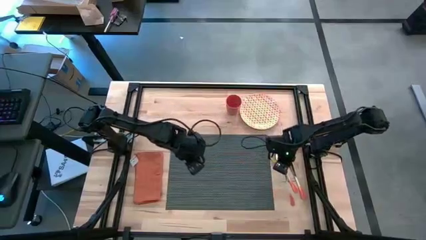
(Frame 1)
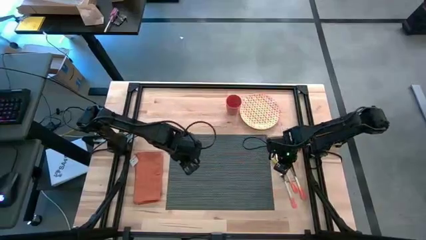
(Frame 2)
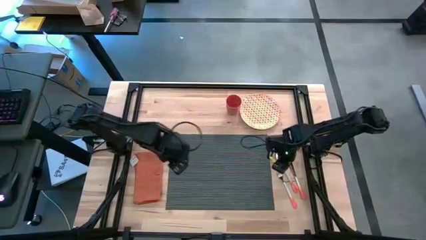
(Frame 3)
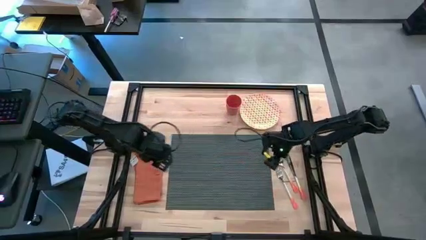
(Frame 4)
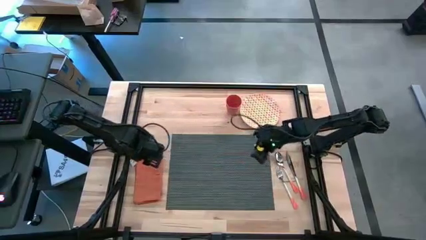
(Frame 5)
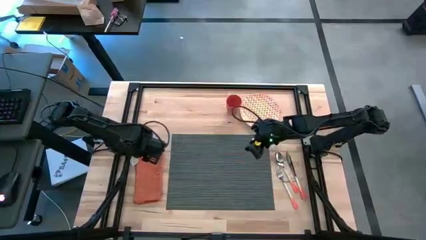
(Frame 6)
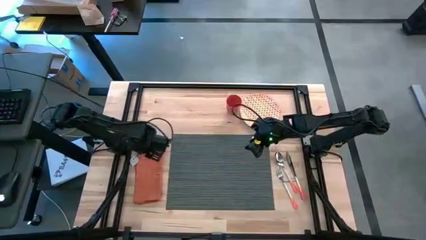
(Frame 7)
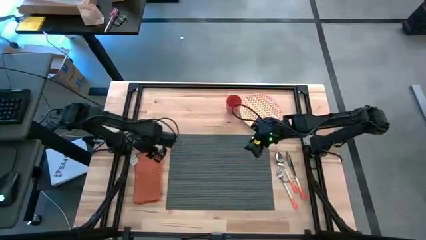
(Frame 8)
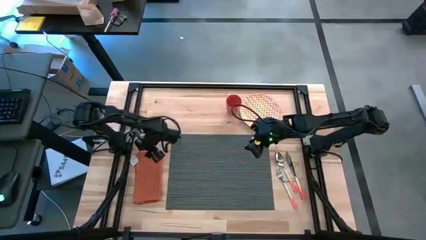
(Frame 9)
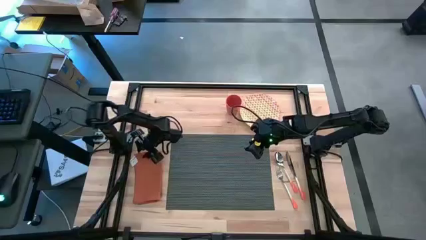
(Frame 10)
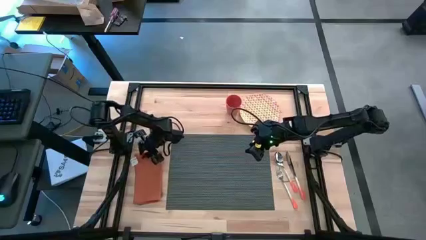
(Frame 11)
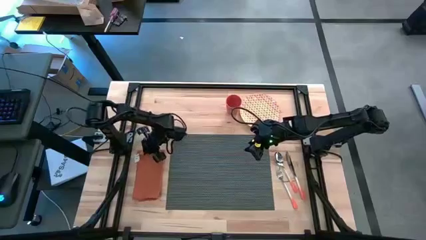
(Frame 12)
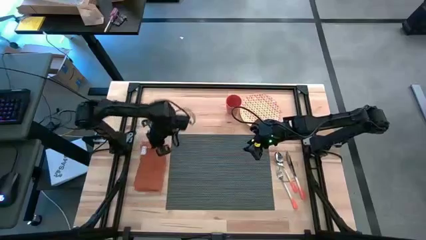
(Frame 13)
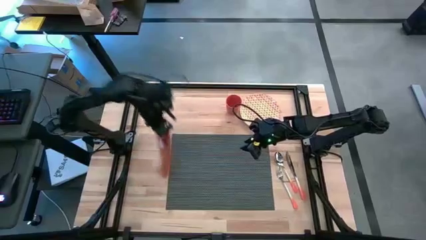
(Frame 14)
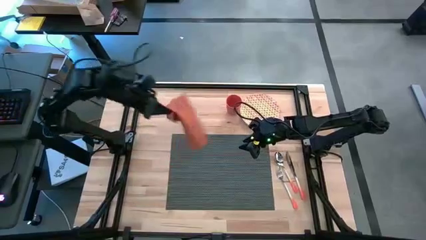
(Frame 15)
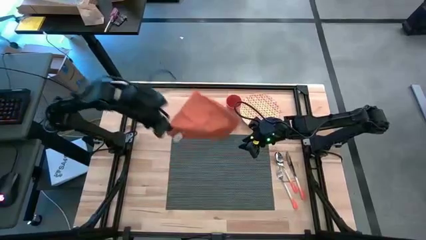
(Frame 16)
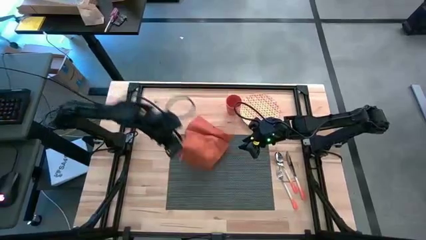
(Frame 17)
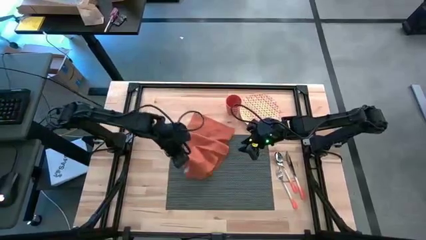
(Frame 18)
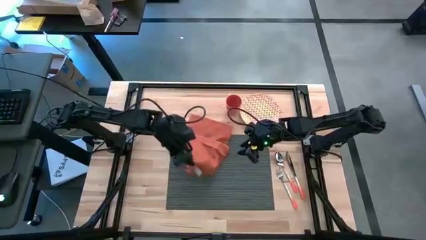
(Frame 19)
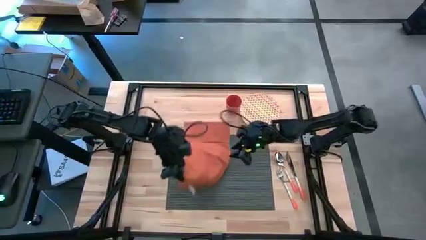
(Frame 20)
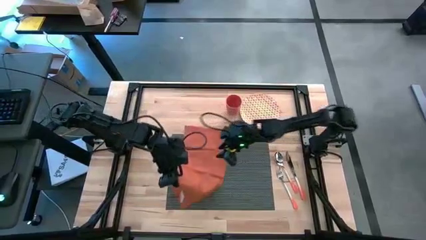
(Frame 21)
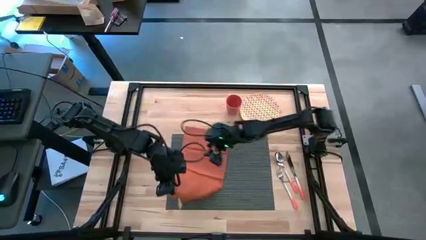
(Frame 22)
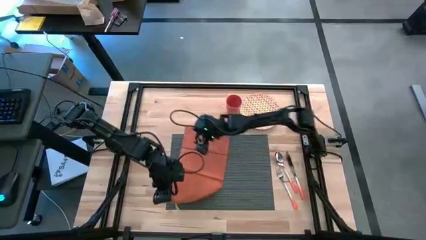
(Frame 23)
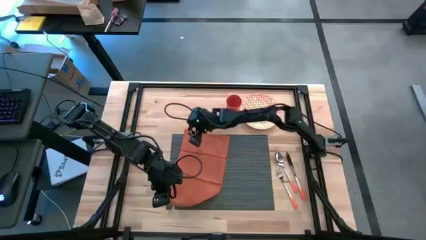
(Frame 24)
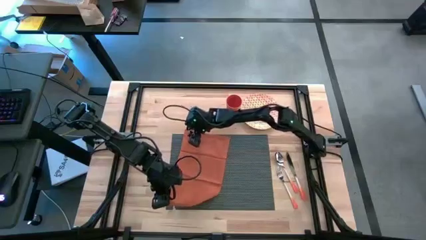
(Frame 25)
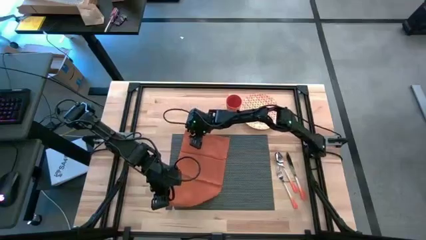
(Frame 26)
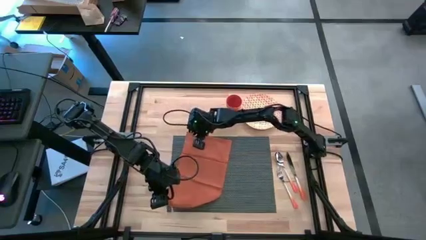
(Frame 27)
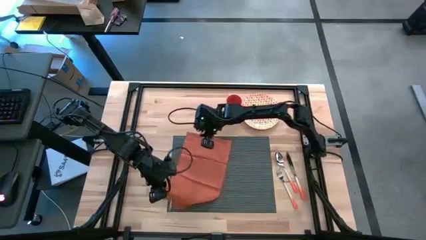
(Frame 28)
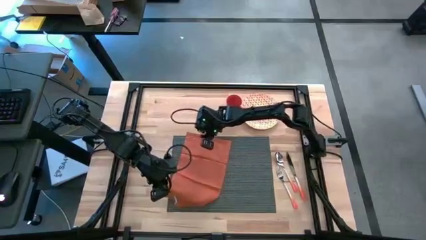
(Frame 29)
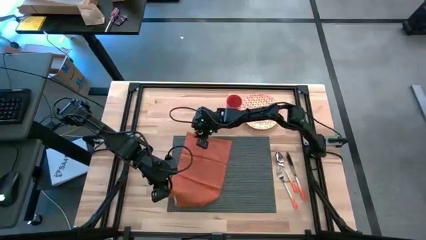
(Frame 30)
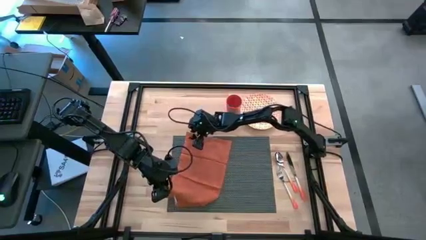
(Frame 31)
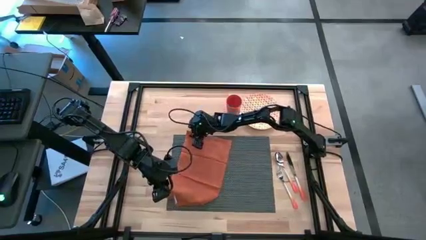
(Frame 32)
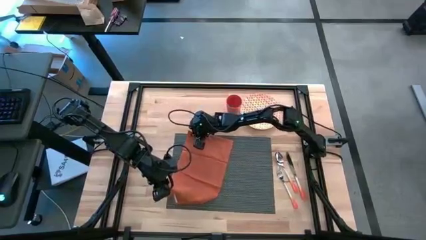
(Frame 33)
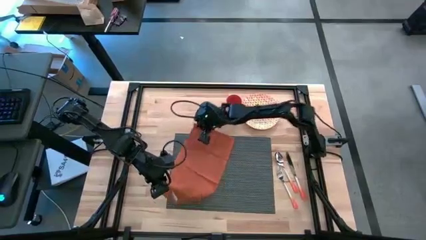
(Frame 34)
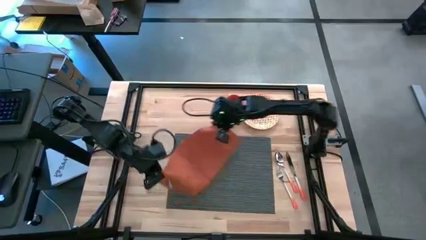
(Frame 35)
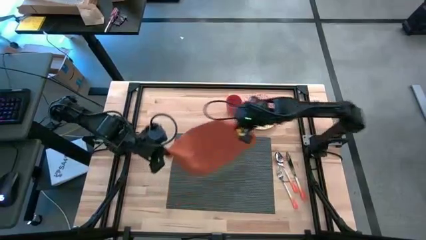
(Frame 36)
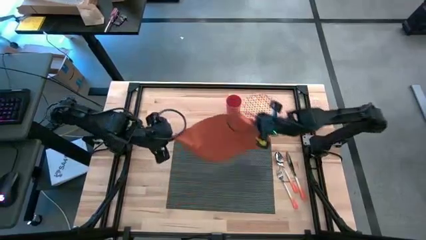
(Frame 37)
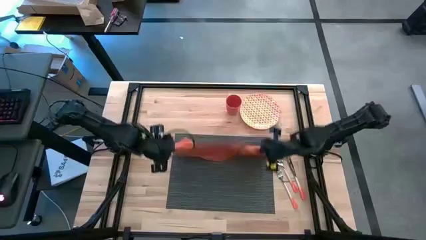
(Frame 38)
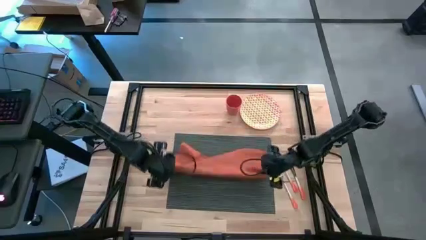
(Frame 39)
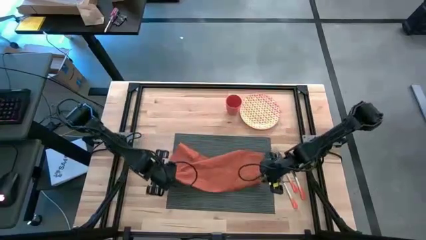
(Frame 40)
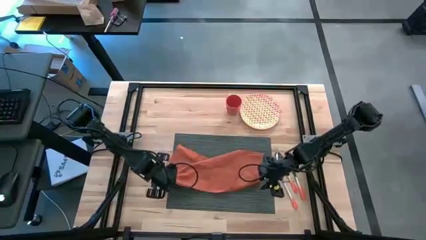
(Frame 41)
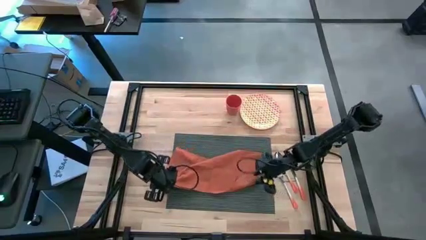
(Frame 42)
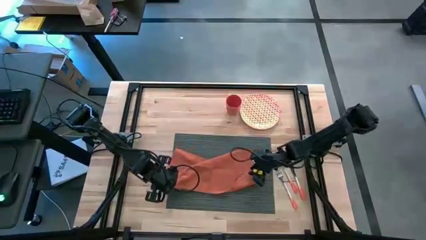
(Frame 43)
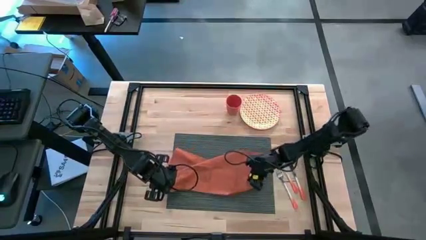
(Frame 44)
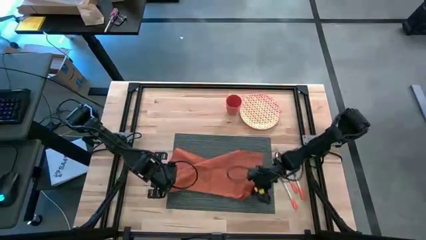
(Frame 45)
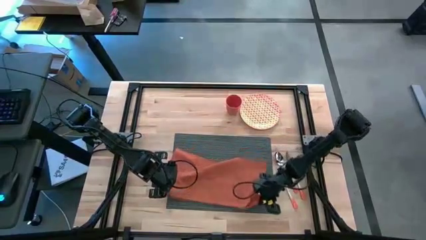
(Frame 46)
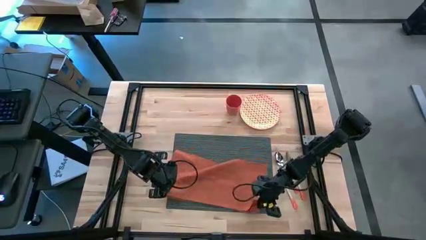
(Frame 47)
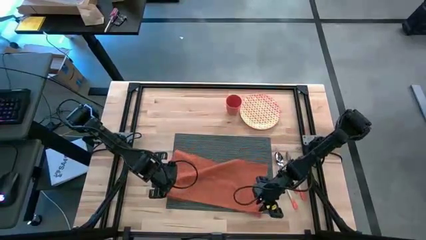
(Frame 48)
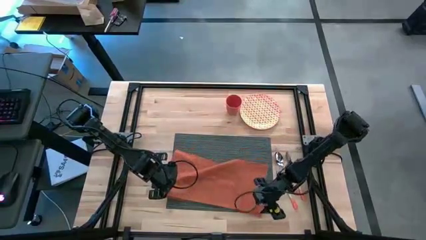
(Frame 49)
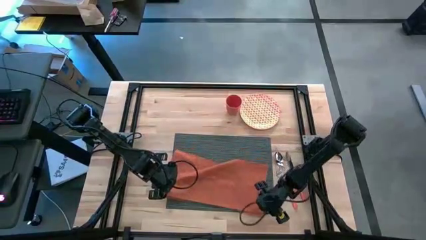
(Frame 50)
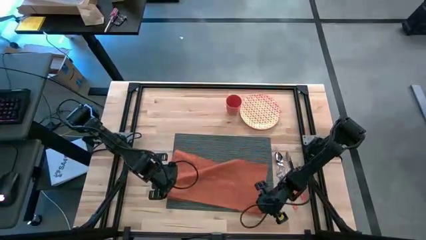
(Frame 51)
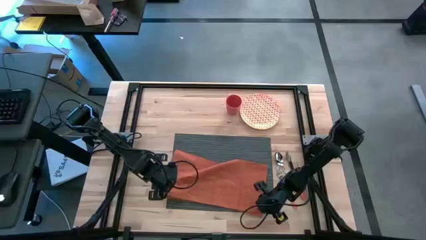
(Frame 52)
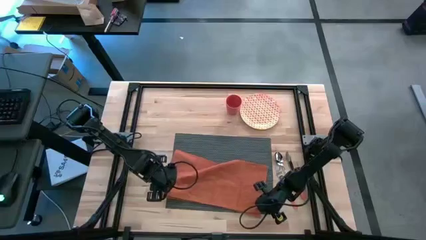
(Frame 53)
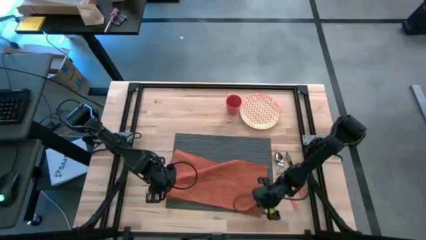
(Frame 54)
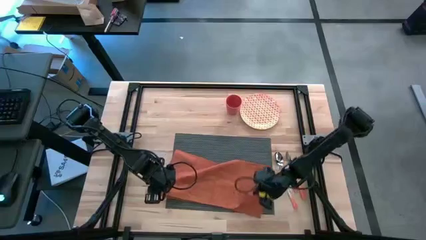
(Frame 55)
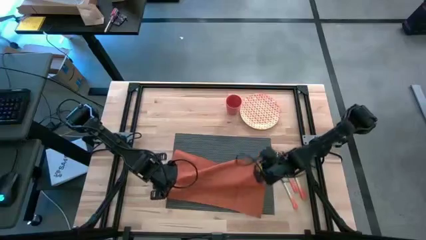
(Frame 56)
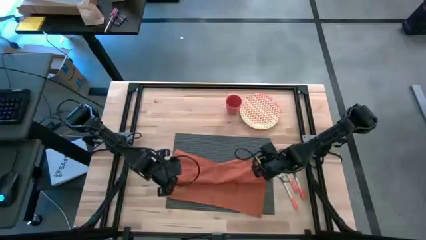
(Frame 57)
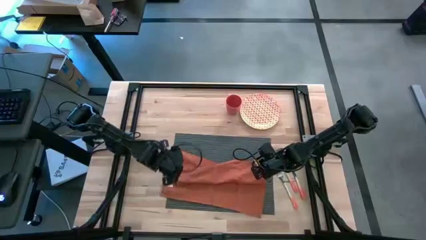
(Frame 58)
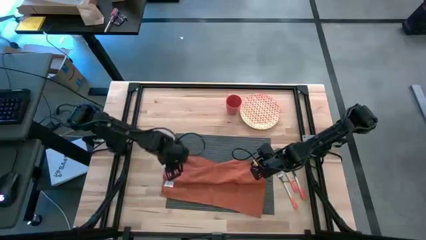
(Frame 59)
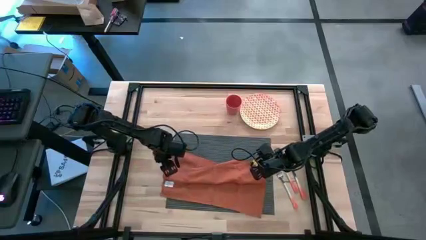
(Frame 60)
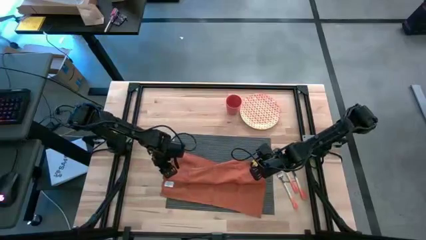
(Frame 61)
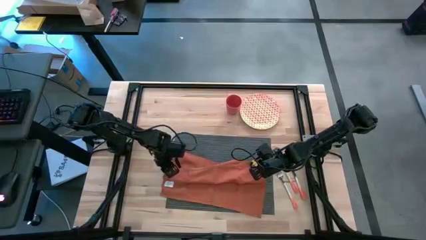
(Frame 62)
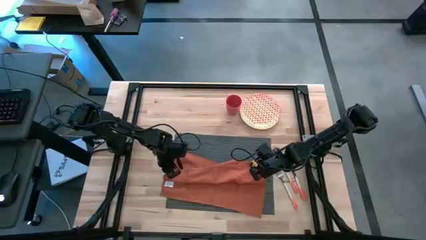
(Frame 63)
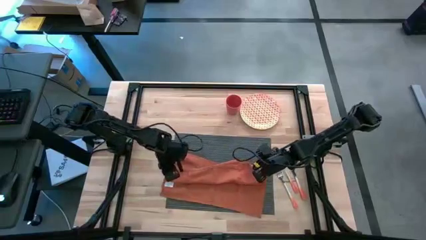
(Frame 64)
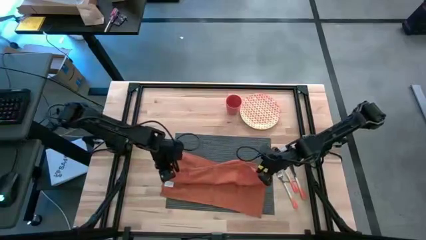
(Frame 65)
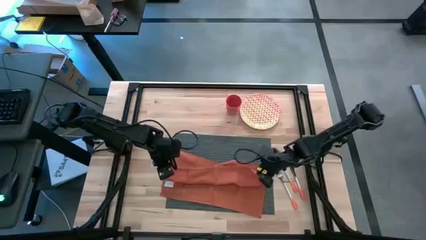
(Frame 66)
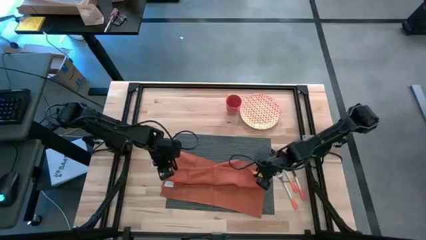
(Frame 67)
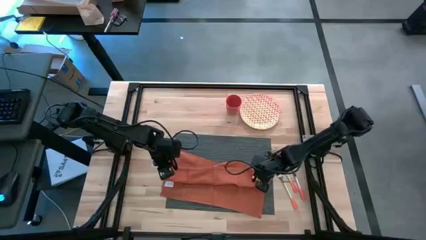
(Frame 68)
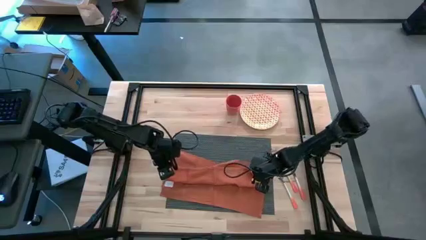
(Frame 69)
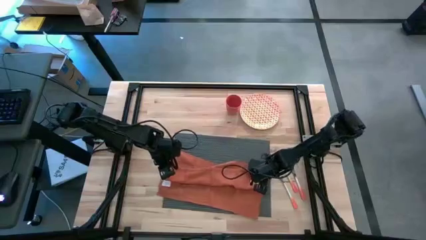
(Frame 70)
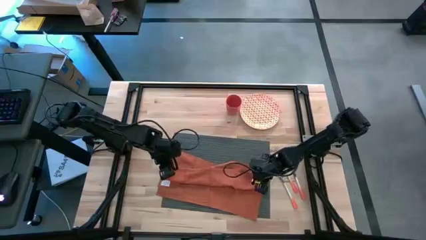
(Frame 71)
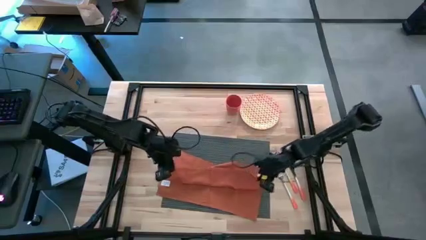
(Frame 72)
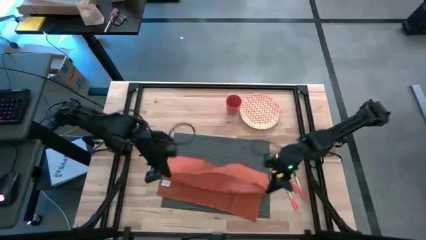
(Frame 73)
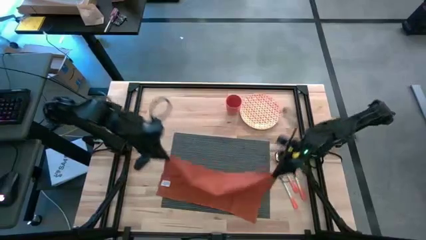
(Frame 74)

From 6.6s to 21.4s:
Task: Set table place
Fold the orange table napkin

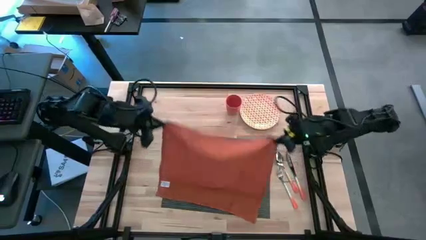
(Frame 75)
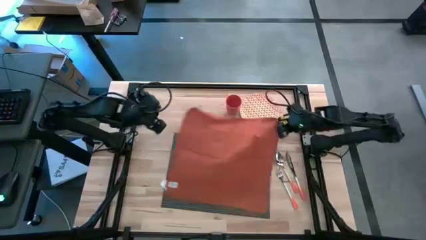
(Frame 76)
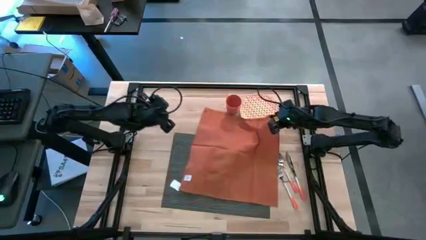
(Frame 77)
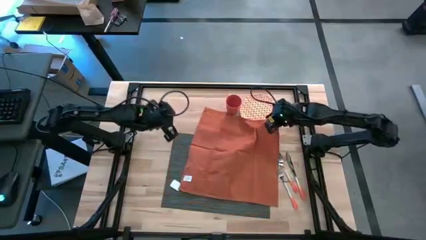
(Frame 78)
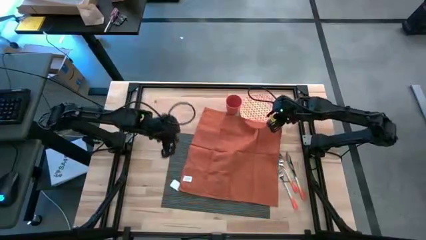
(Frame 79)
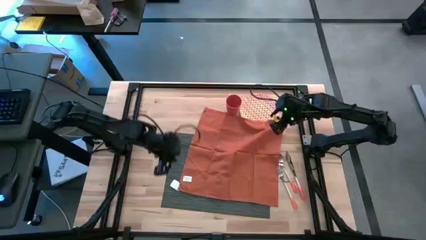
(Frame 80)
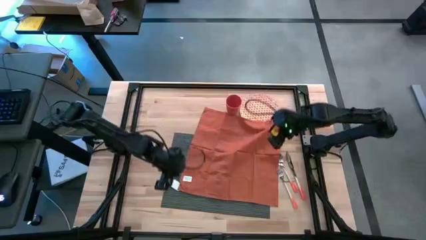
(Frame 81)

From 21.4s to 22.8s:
Fold the orange table napkin
